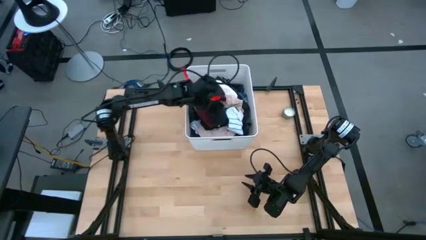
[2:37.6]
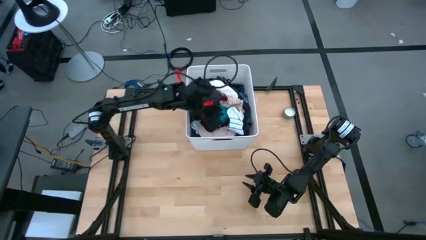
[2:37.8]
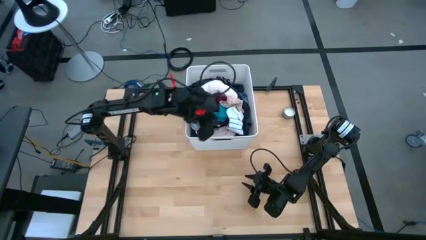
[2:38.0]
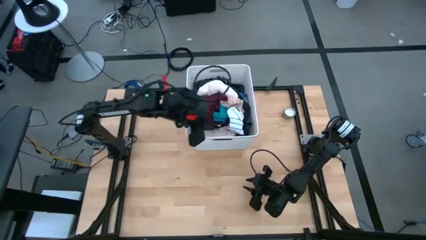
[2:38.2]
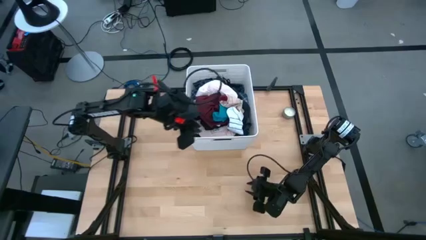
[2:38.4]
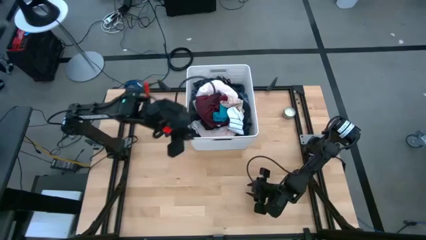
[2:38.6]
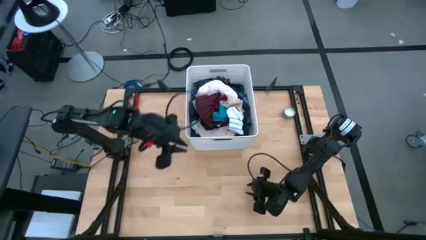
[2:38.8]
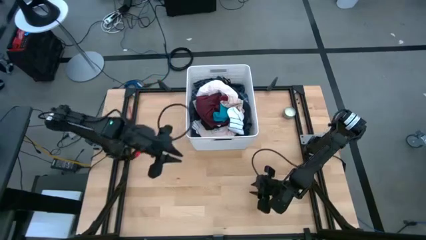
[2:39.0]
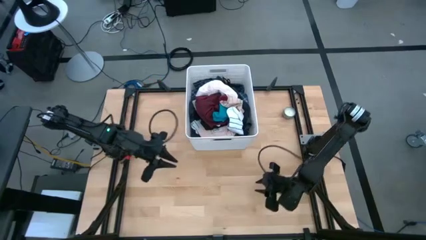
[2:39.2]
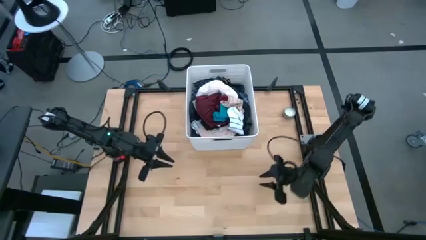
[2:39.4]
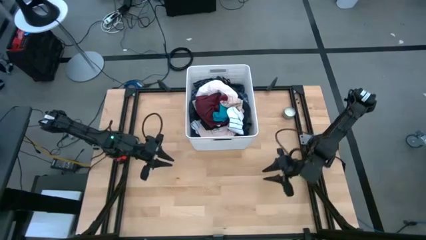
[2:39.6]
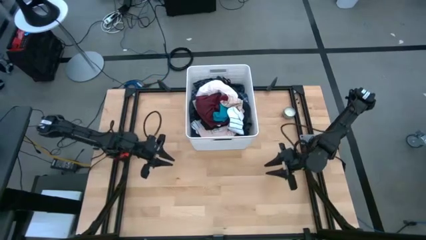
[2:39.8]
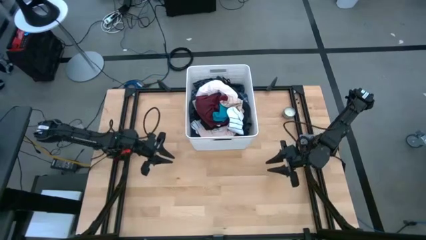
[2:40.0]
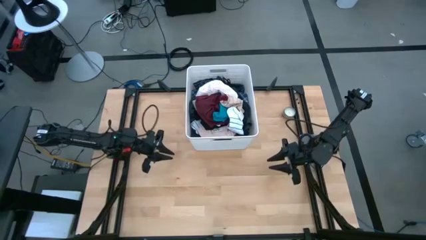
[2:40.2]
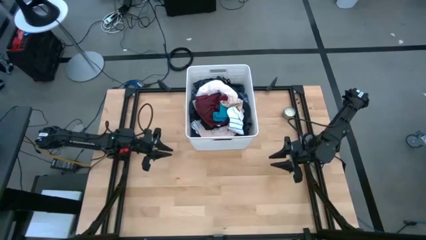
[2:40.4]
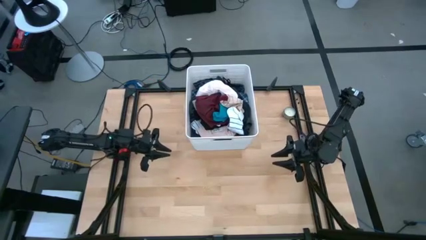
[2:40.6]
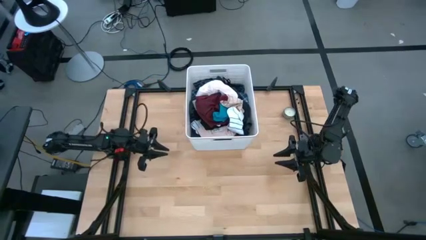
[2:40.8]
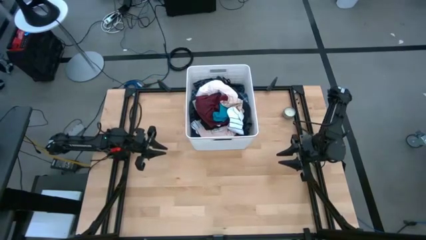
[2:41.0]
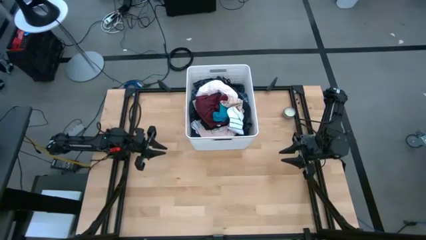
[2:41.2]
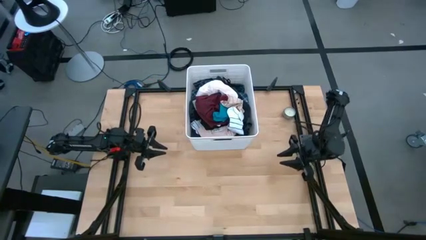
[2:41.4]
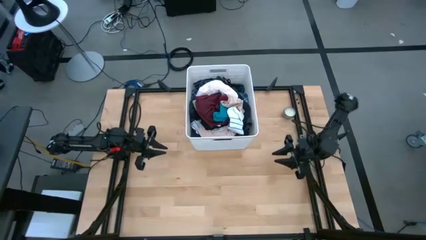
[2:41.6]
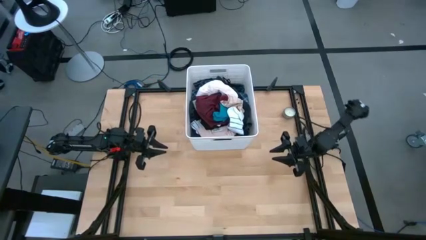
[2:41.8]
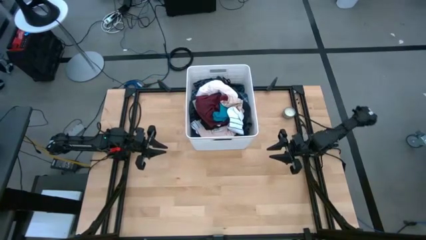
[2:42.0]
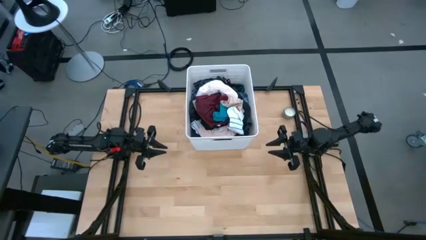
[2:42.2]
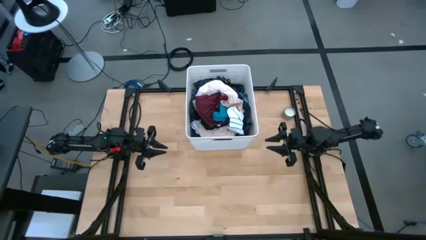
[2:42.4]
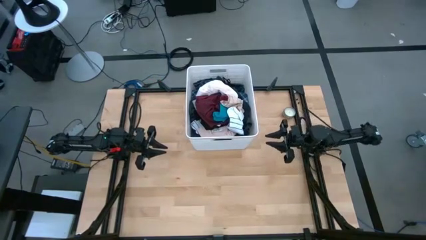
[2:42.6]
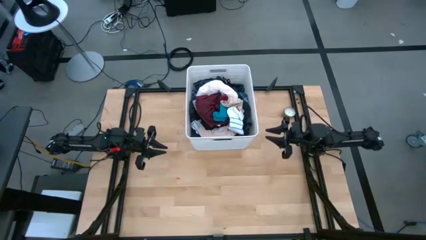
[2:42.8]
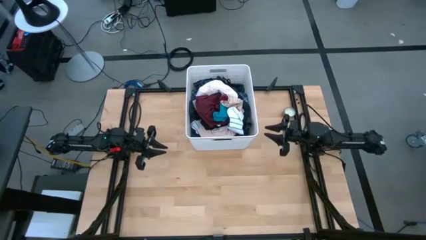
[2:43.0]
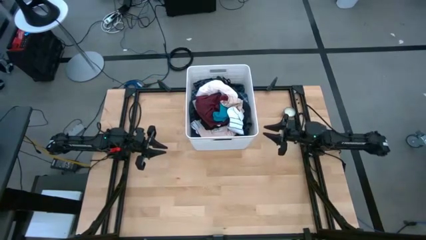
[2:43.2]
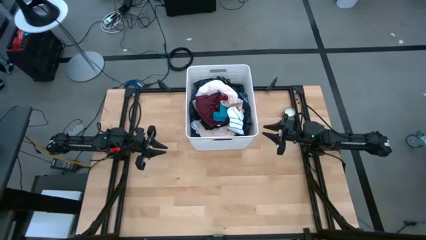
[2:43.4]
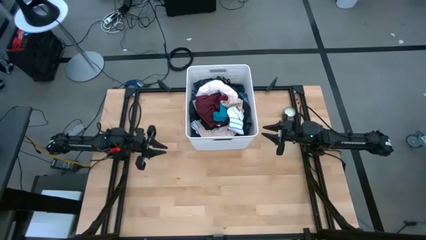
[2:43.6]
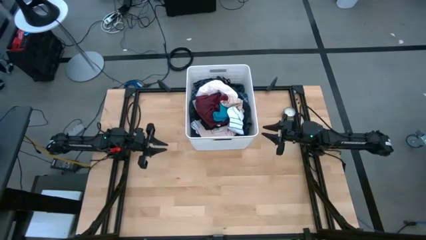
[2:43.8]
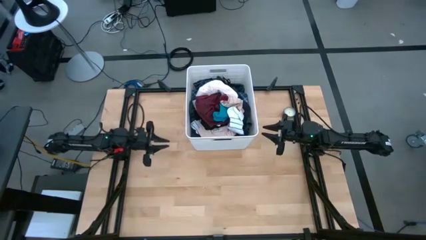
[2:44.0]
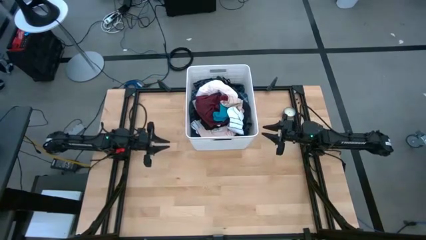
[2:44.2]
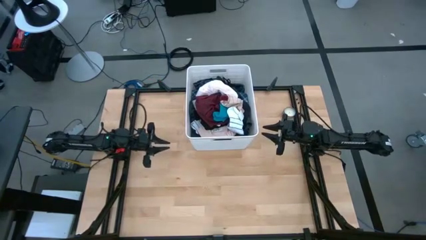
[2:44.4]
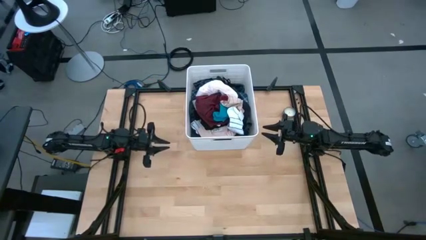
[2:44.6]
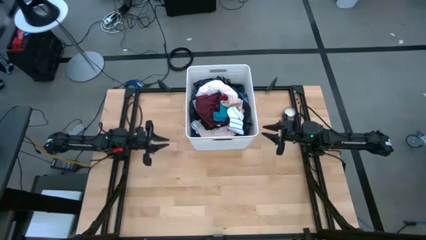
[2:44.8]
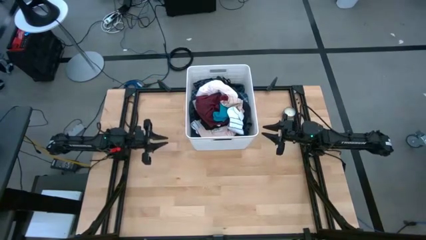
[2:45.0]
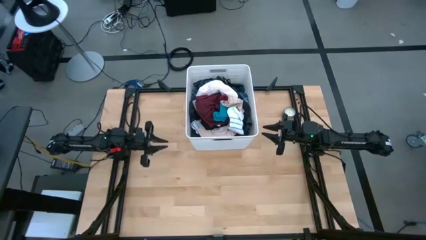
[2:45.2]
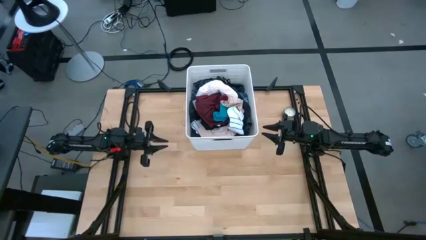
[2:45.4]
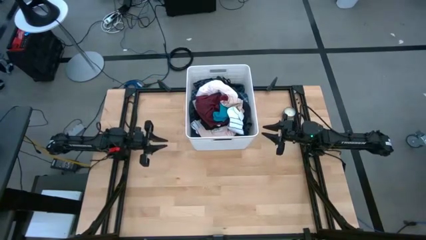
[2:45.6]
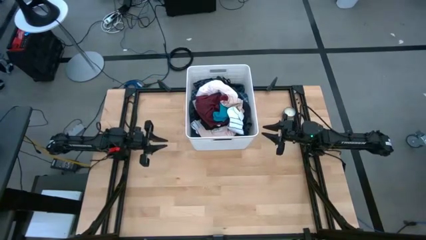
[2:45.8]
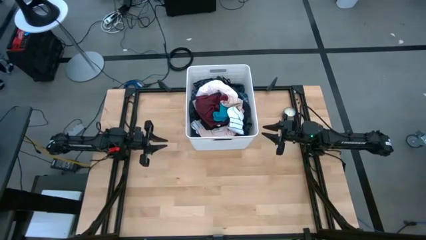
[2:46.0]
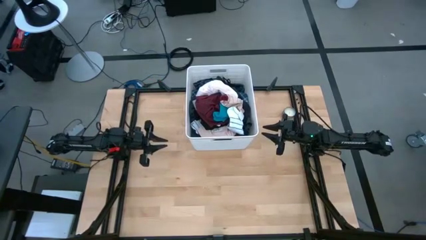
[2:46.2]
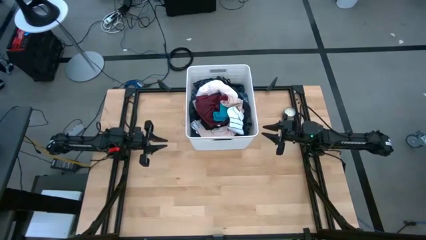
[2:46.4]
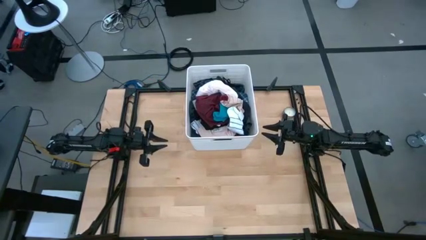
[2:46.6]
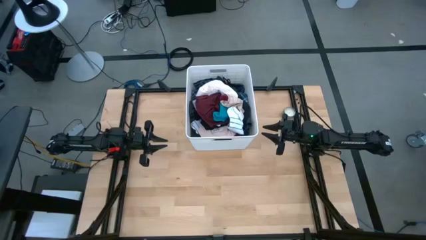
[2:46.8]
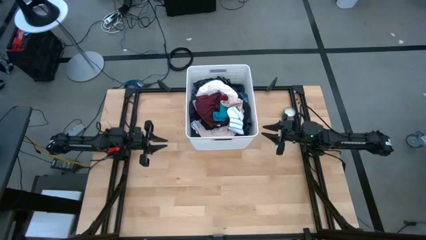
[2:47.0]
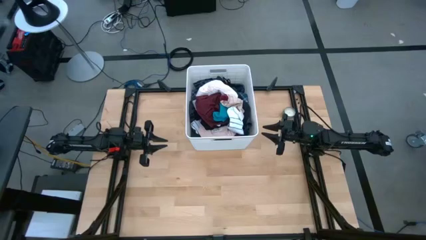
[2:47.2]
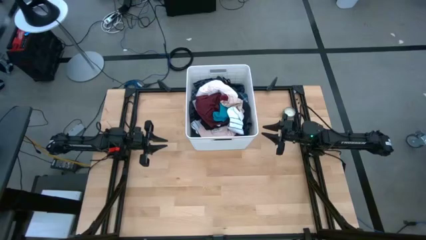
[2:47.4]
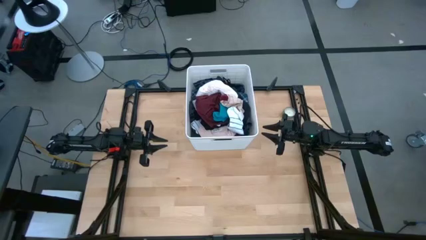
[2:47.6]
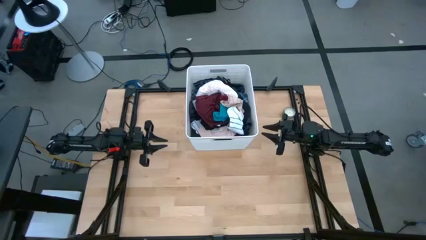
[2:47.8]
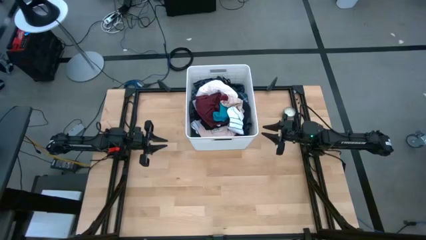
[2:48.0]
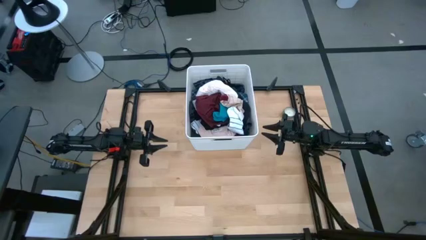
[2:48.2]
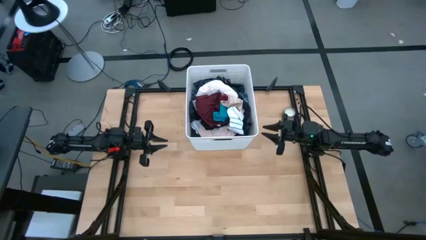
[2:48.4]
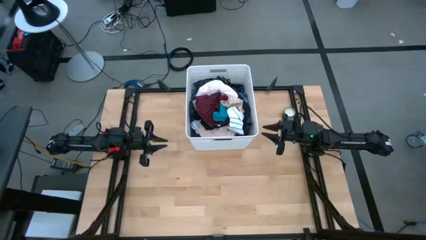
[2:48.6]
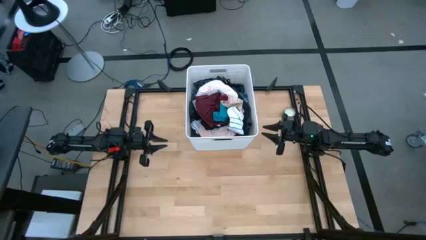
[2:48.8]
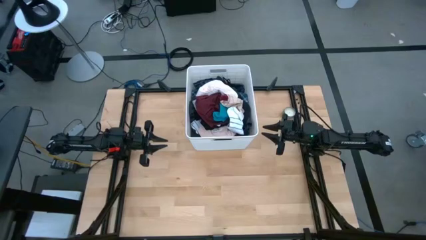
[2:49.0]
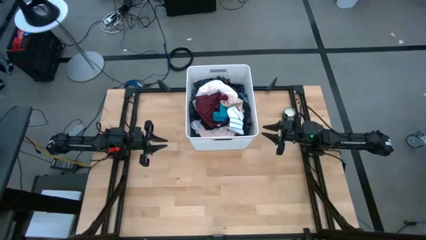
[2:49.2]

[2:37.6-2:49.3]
Task: Sort clothes
Return to Home Position

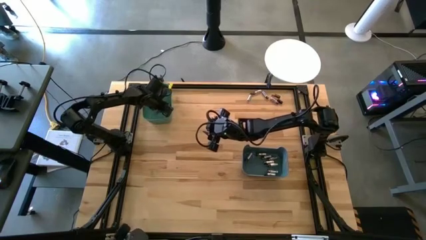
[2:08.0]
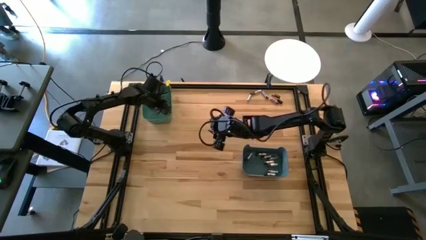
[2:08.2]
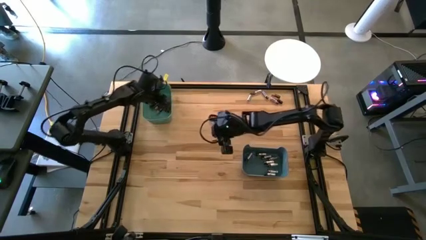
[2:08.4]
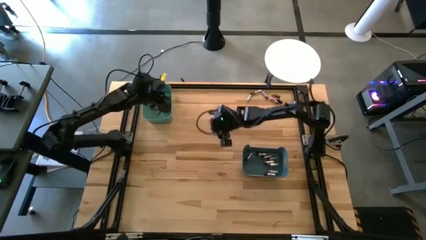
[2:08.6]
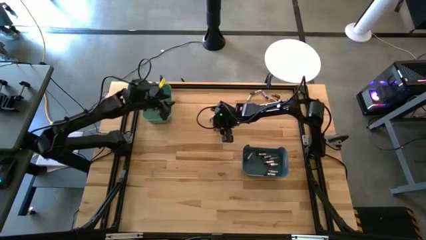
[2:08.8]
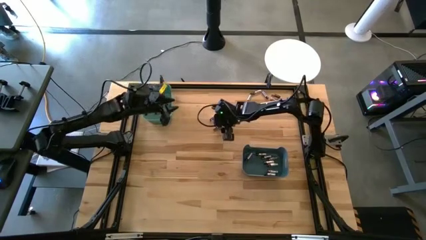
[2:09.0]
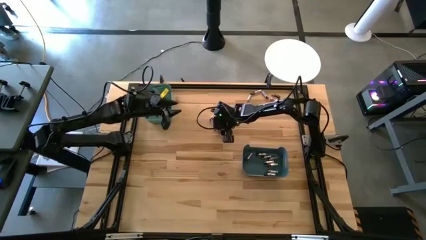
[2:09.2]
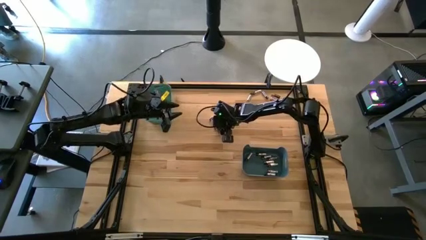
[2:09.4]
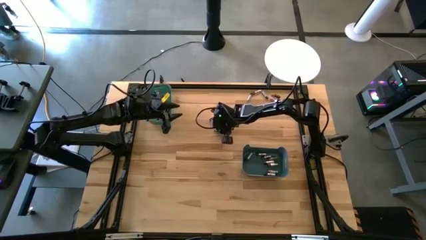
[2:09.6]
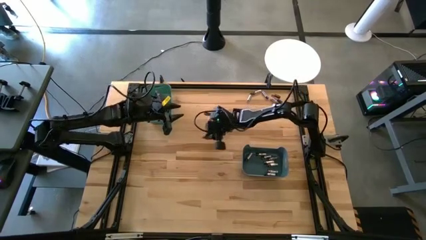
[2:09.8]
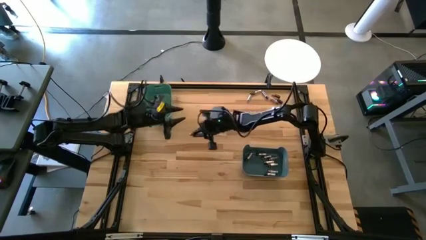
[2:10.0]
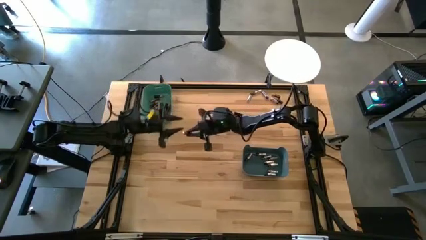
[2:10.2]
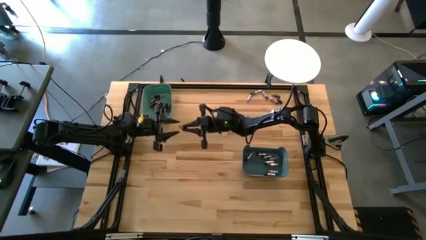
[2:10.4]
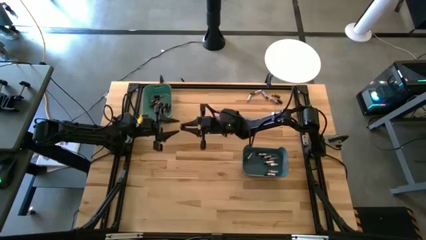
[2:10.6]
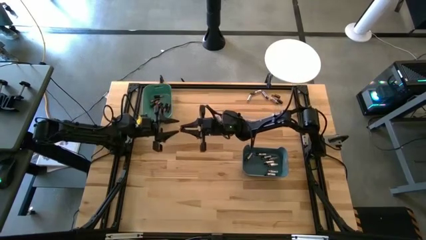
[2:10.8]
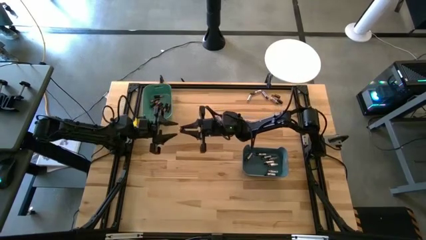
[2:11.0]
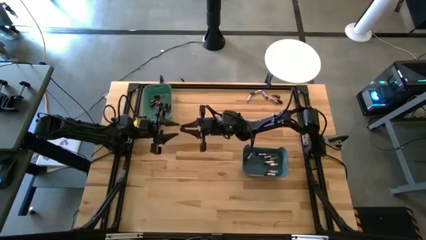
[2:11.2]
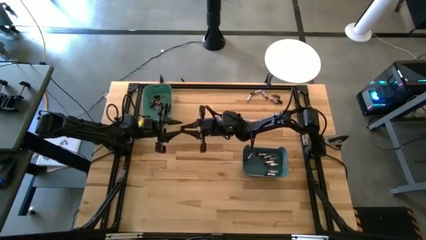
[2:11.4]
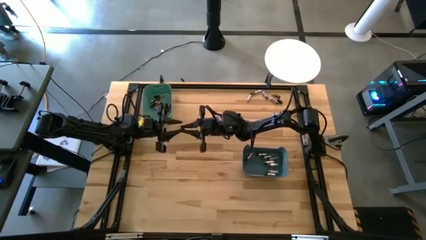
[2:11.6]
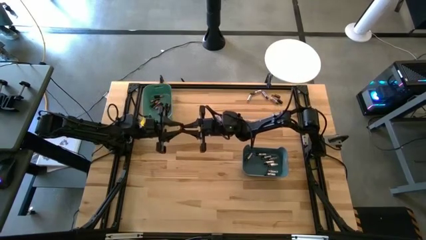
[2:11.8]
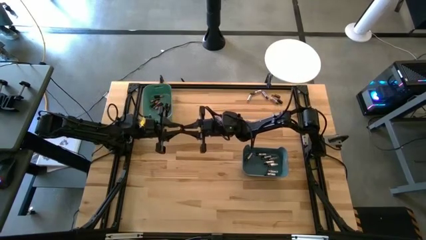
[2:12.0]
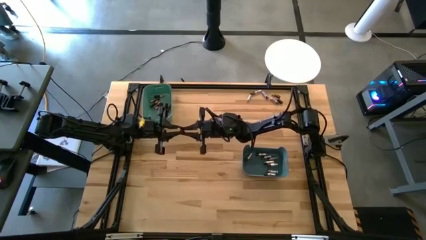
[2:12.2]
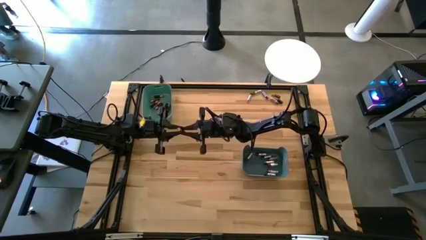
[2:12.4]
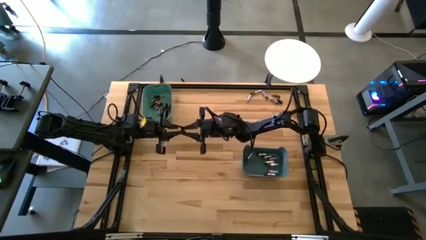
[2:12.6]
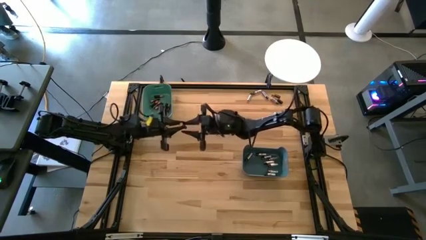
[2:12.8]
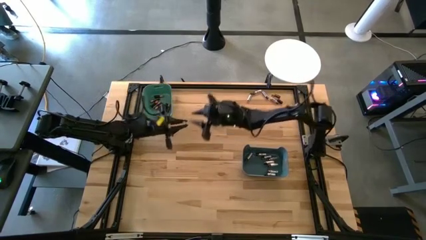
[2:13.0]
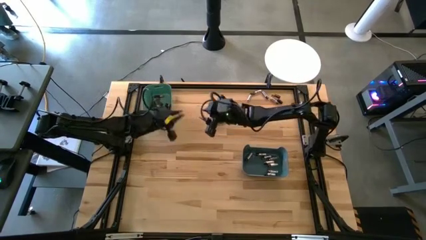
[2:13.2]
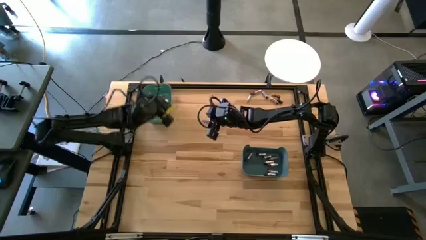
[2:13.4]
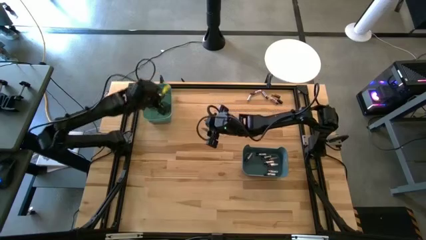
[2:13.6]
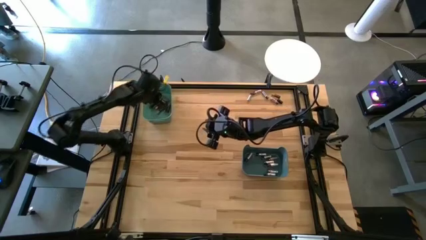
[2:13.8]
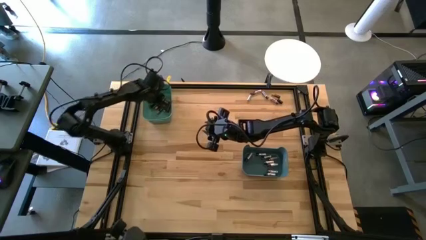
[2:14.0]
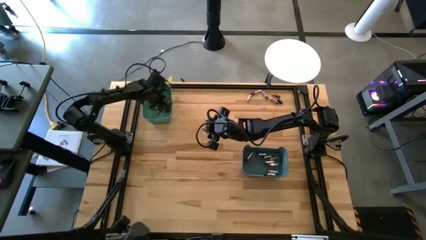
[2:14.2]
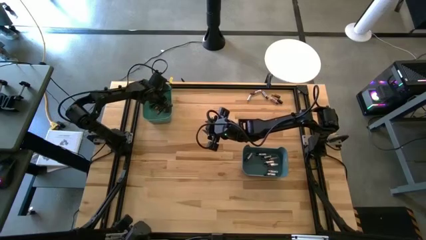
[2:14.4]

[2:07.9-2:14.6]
Task: Sort batteries
Put the black battery into the green bin
